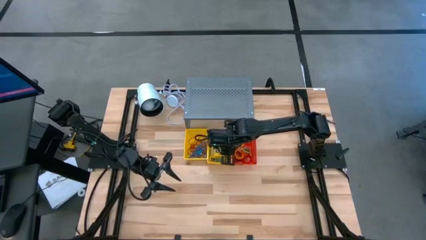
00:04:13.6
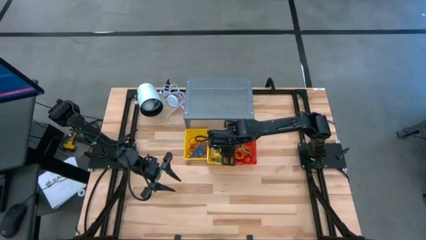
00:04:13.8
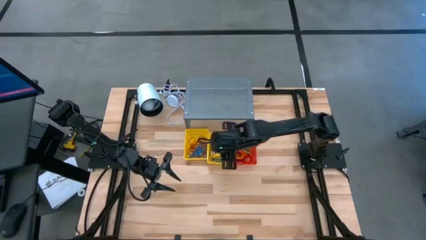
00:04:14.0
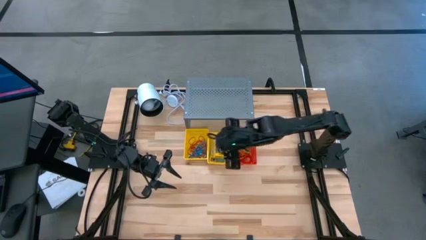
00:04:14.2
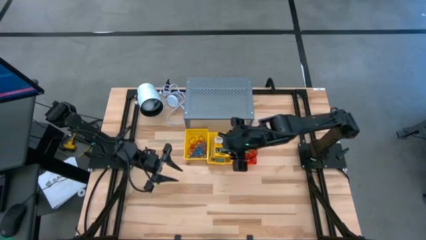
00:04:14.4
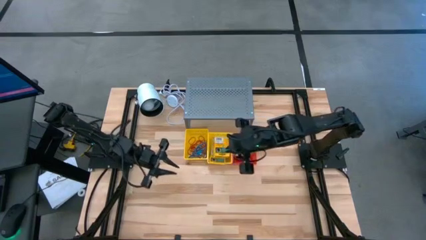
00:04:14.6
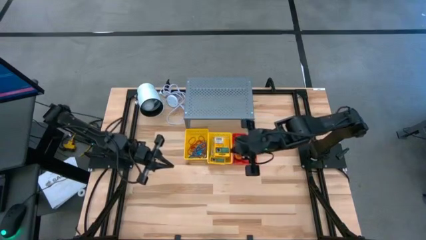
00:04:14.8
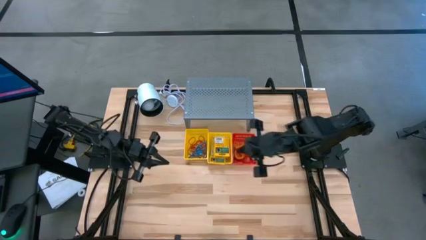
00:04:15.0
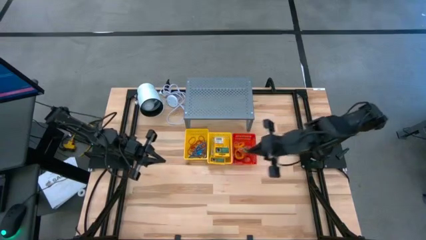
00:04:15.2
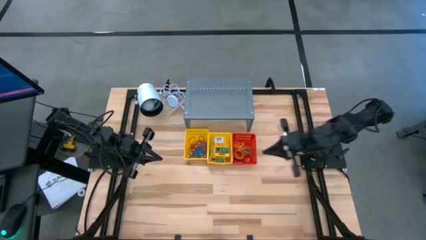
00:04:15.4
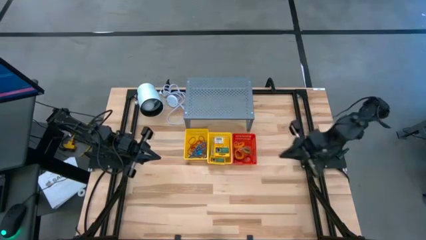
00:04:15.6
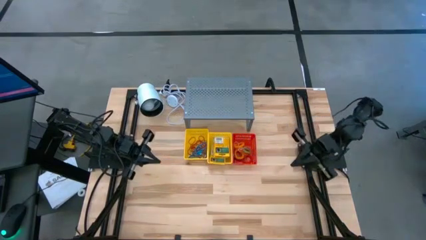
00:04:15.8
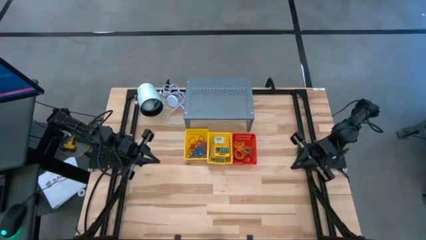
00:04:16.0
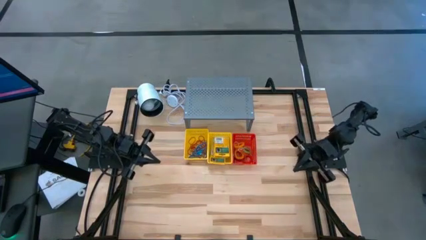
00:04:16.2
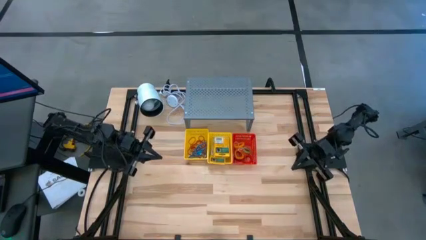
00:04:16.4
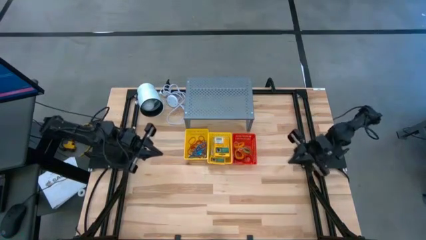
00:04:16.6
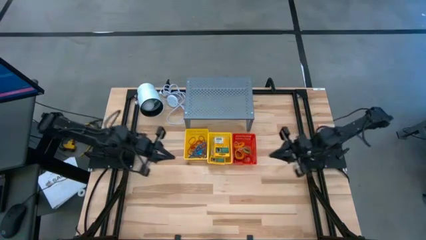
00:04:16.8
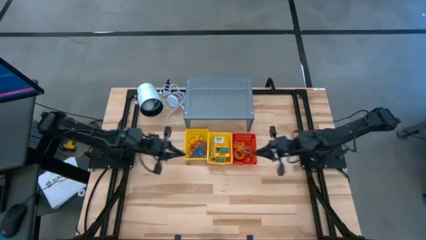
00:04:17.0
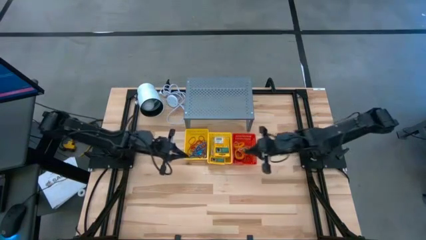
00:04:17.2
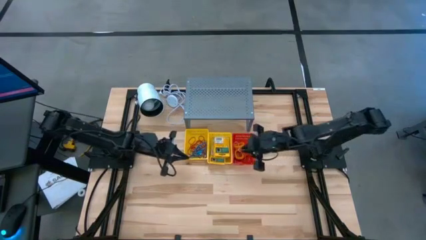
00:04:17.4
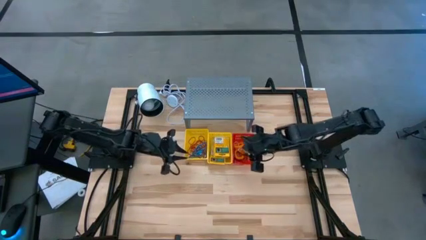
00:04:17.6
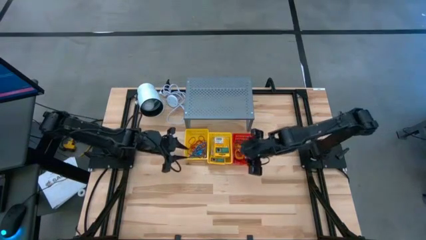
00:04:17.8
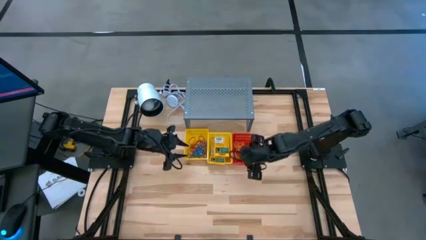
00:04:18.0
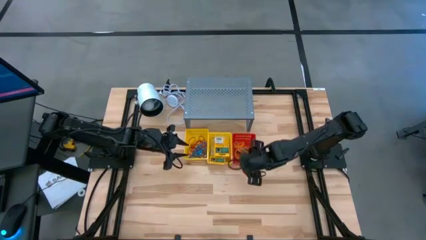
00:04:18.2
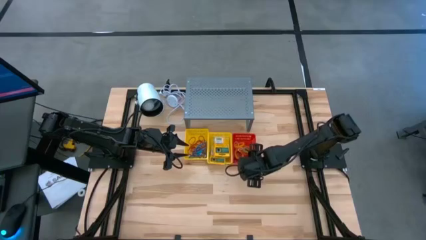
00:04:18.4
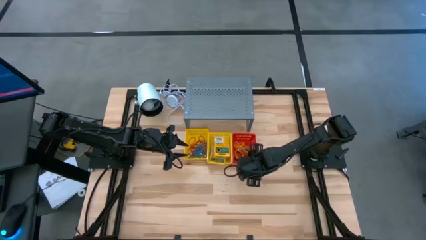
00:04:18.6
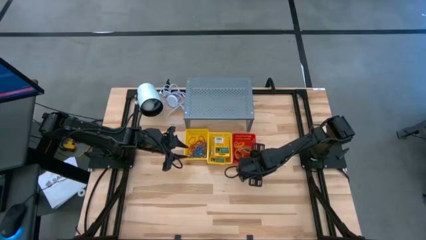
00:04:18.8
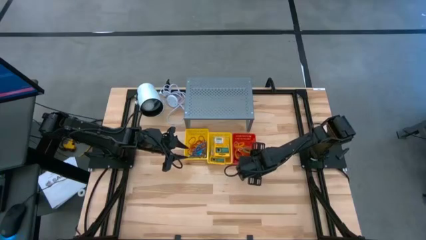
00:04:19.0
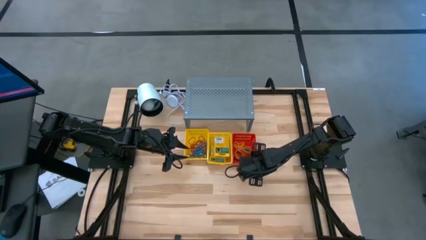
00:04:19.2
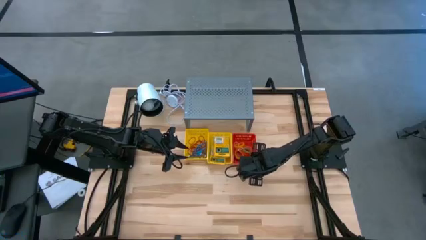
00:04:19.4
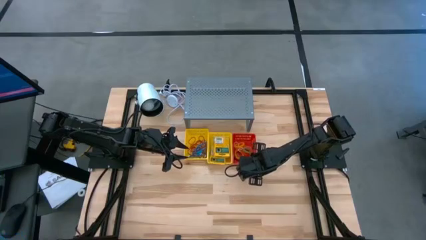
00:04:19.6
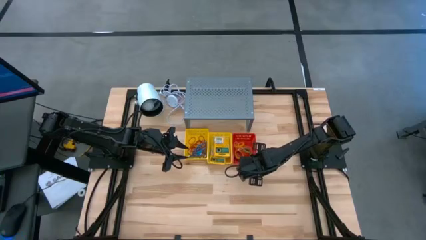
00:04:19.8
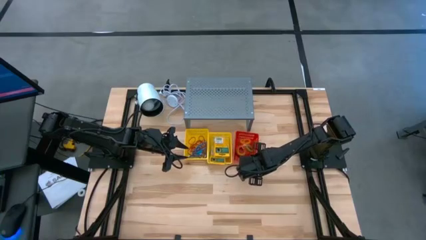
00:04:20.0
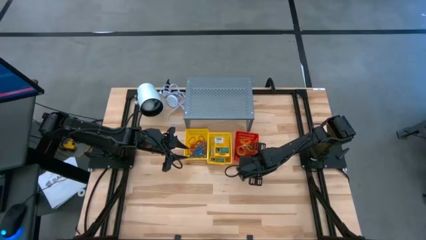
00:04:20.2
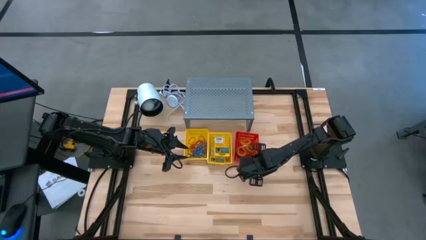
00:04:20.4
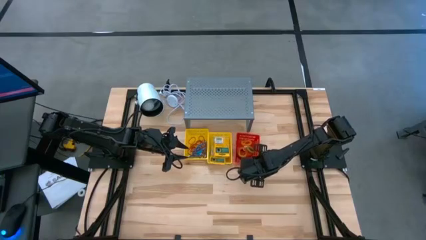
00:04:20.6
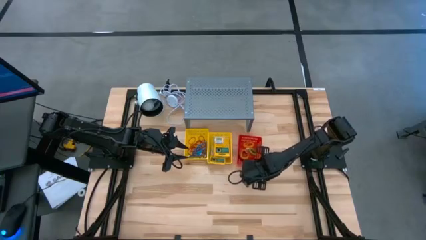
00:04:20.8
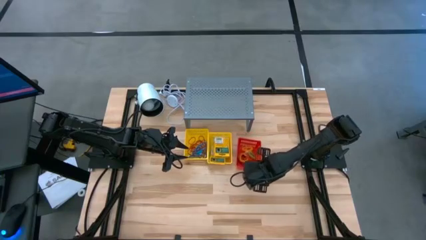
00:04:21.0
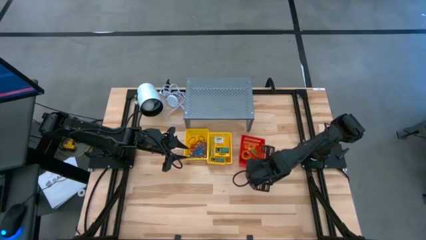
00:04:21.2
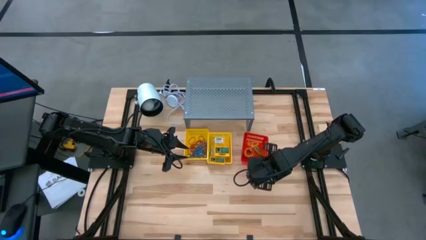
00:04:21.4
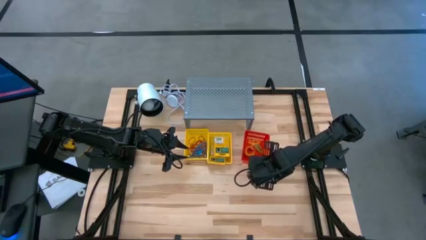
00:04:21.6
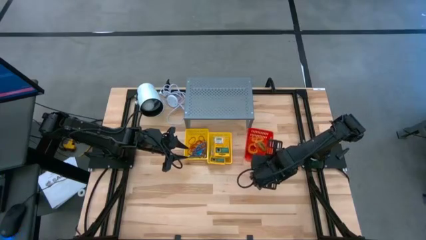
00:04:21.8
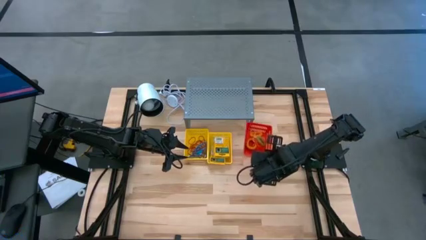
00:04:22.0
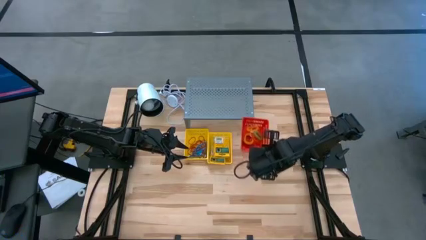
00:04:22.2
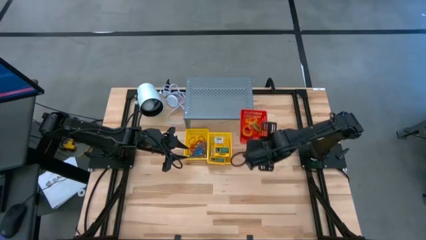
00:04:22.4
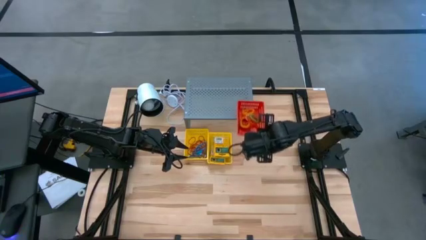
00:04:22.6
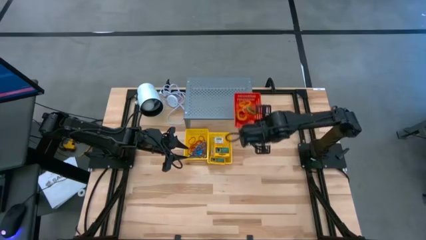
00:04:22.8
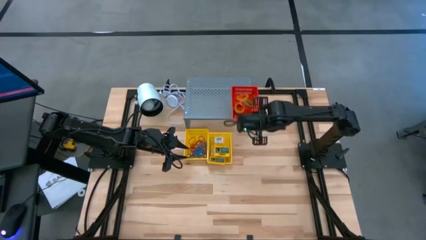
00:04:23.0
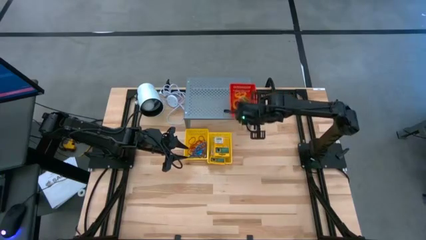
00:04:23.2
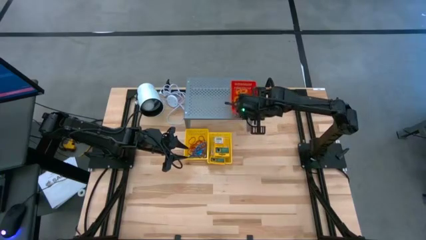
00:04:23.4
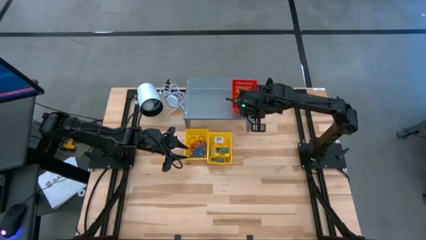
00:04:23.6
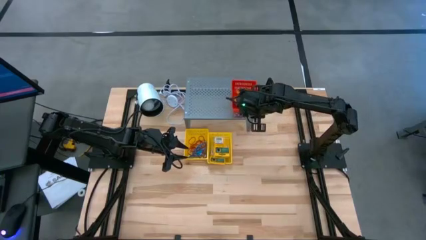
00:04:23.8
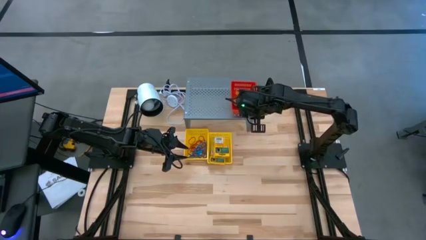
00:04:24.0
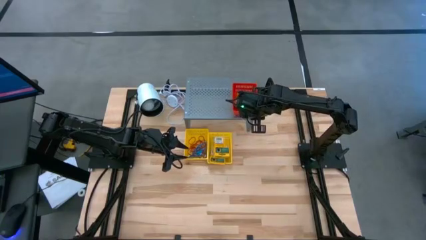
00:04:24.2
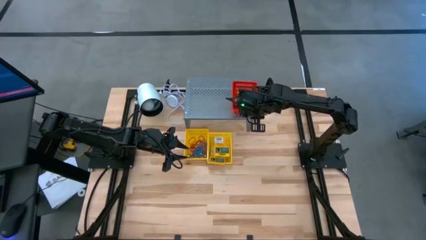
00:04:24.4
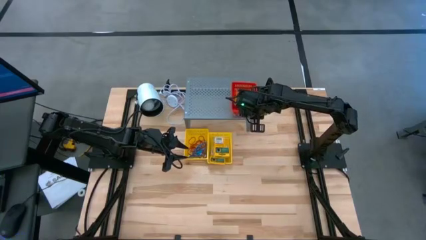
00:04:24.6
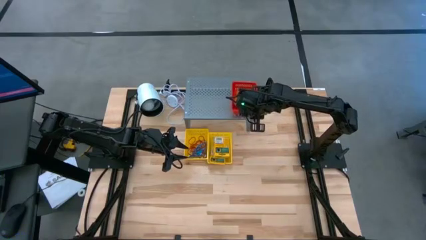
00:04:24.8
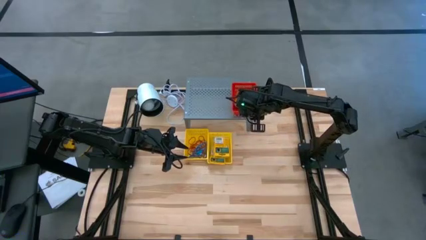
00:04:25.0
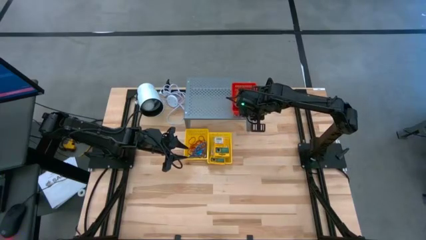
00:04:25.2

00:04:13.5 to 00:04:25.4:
Task: Pick & Place Office Desk Supplies
Put the red basket with spring keychains on the shelf

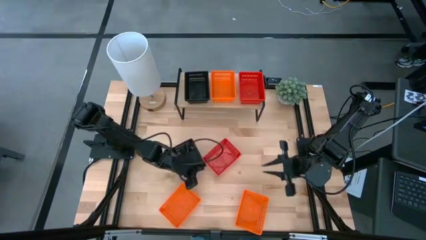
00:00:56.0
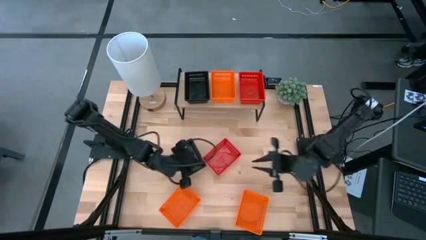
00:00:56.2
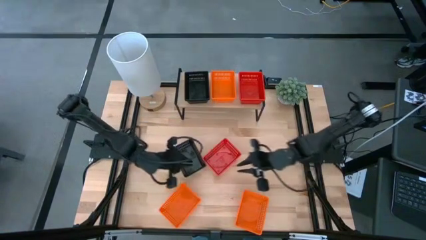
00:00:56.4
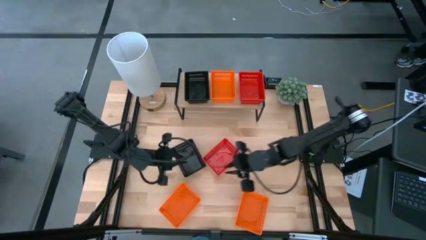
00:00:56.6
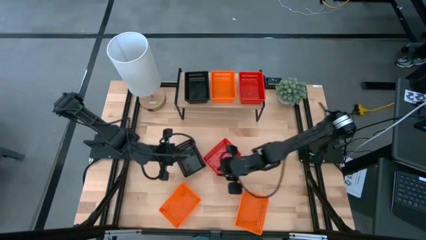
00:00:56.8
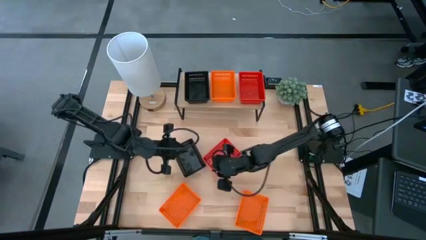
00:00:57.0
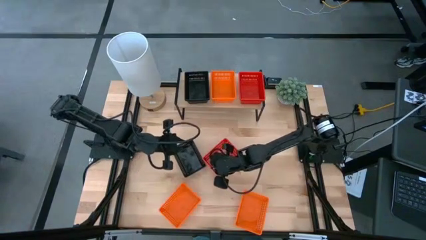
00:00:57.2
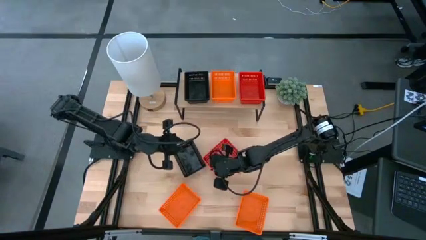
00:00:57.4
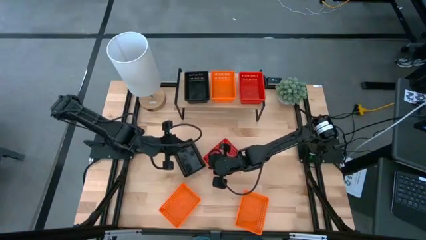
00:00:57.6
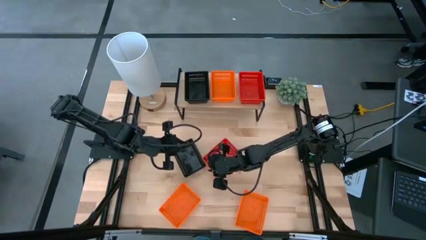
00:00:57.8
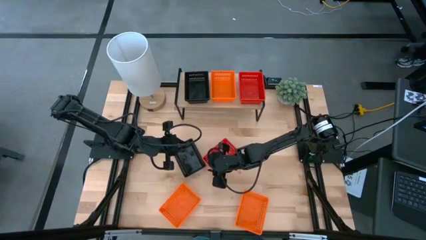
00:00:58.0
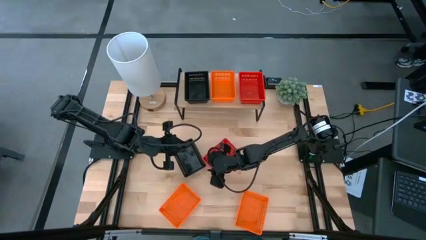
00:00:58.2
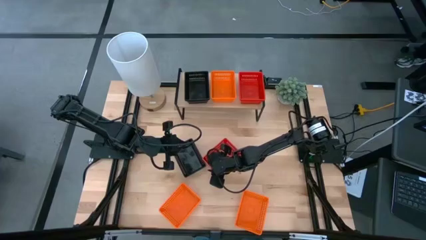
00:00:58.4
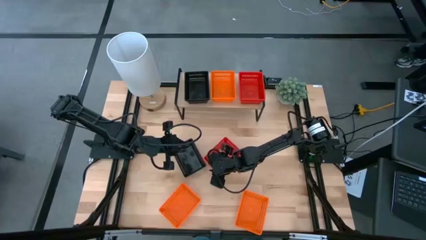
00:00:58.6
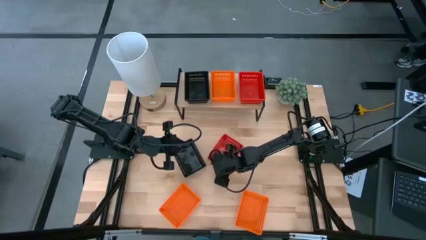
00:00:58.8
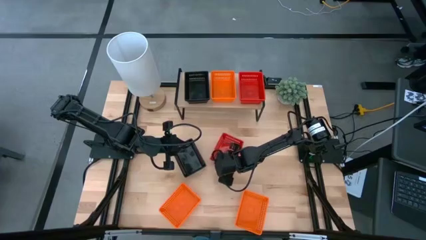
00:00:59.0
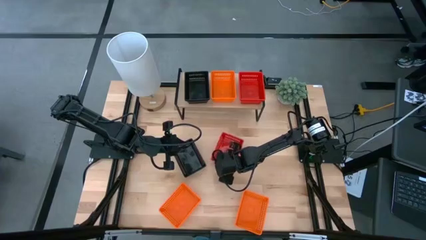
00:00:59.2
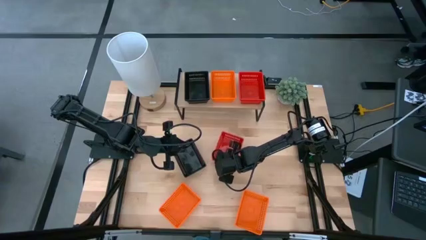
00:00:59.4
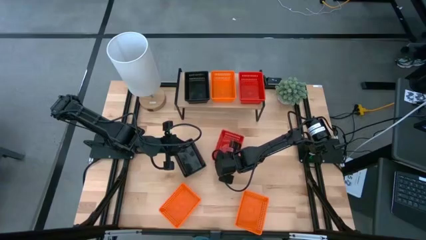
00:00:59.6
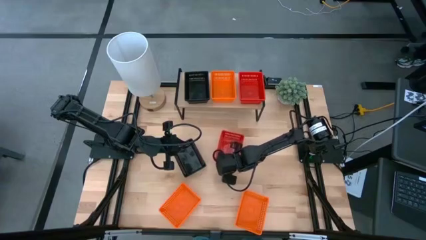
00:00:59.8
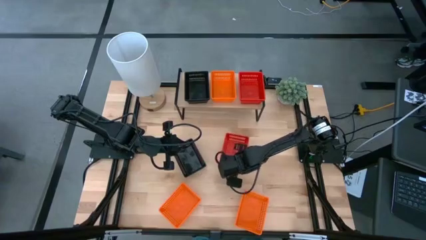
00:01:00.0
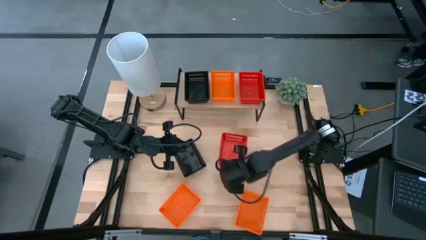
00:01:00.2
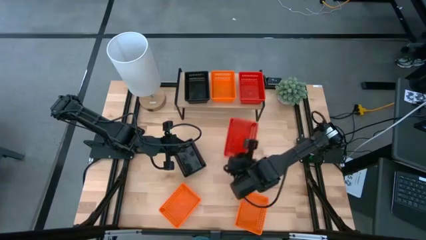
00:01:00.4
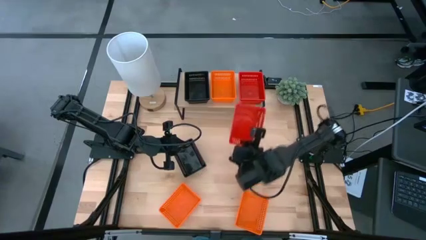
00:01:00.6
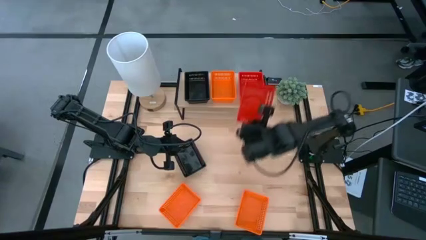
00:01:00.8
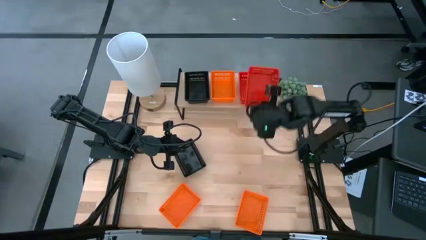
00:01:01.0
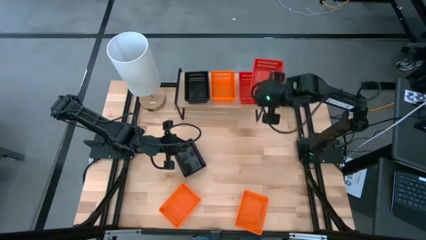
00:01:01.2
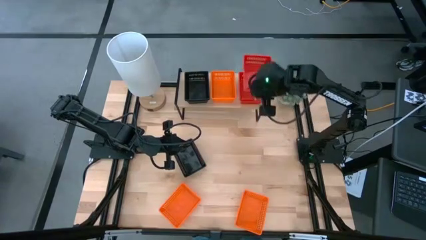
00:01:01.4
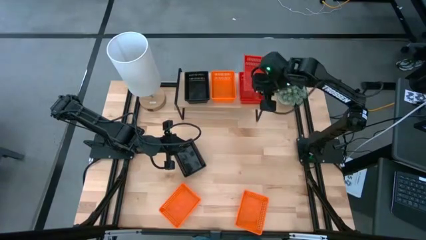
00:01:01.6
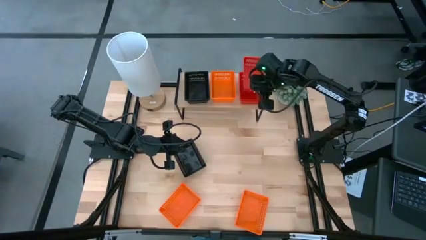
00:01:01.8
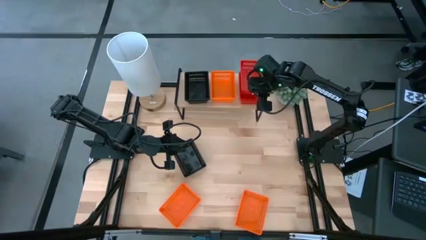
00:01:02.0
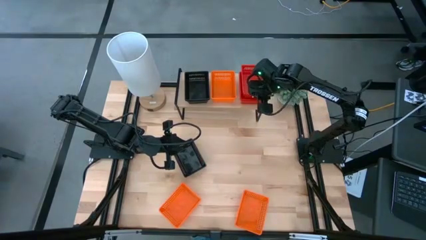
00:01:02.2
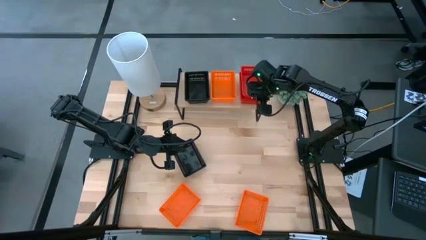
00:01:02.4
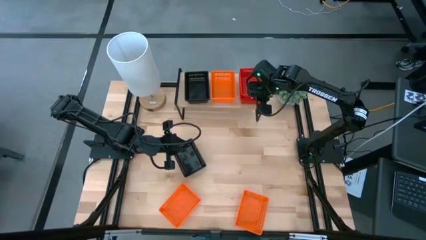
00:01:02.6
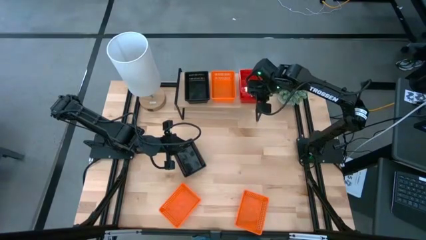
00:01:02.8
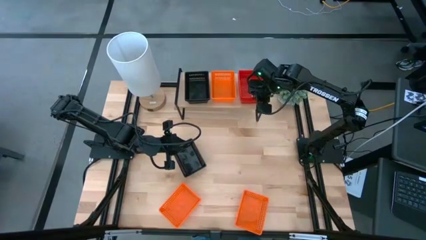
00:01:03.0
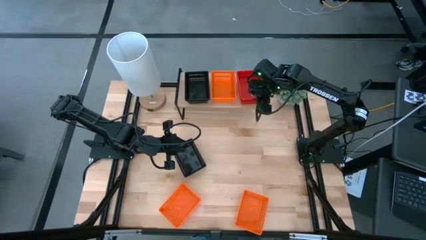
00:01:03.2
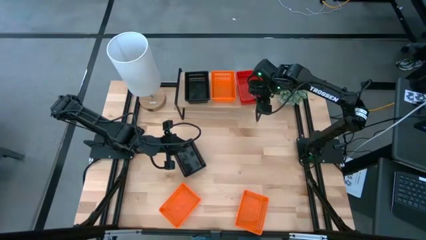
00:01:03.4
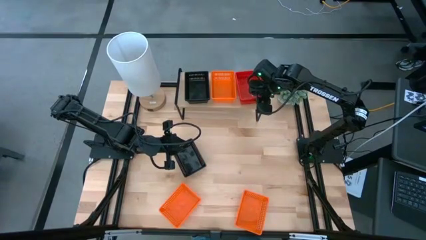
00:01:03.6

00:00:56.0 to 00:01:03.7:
Task: Stack baskets on shelf by color
Stack the red basket on top of the stacked red baskets on the shelf
